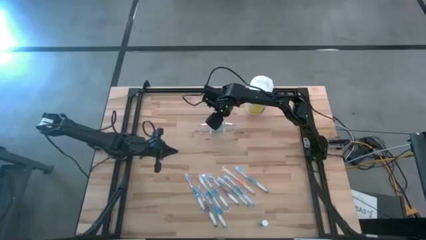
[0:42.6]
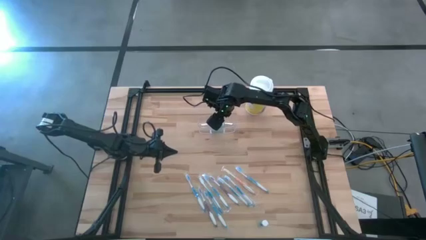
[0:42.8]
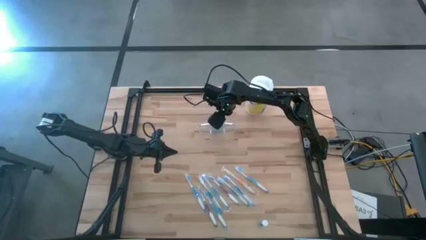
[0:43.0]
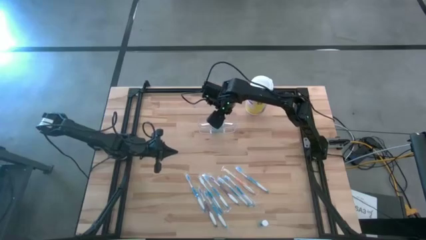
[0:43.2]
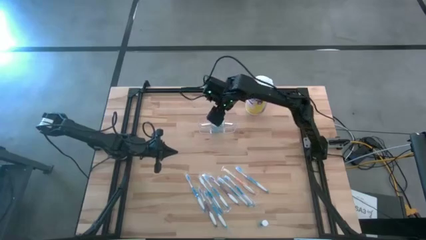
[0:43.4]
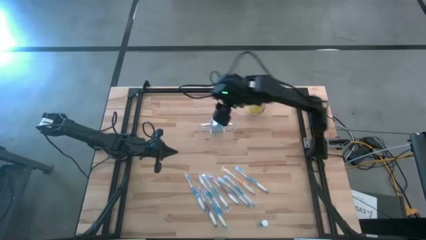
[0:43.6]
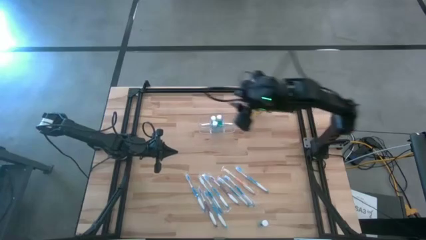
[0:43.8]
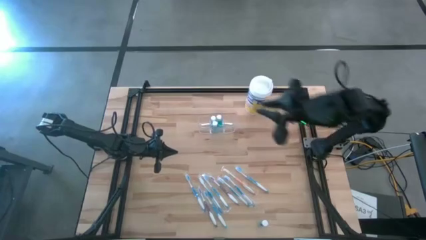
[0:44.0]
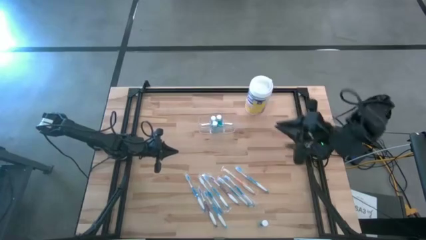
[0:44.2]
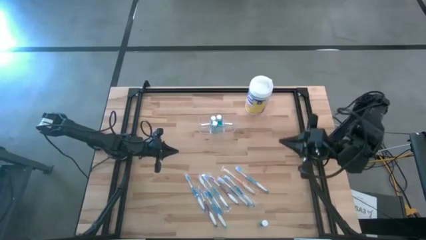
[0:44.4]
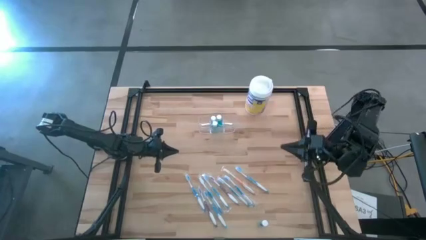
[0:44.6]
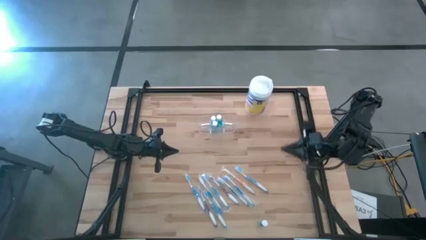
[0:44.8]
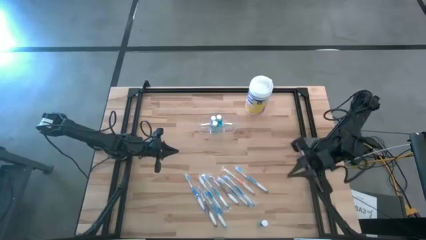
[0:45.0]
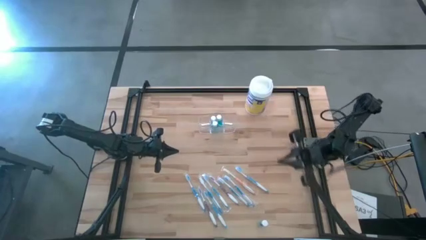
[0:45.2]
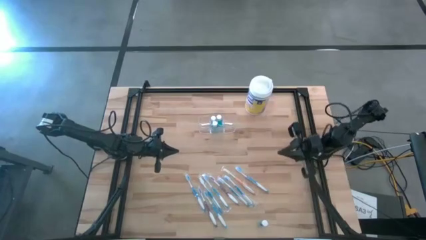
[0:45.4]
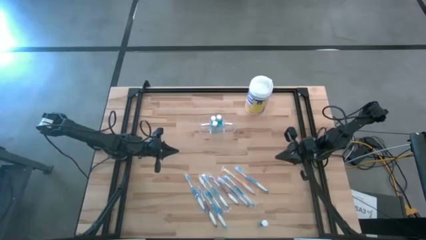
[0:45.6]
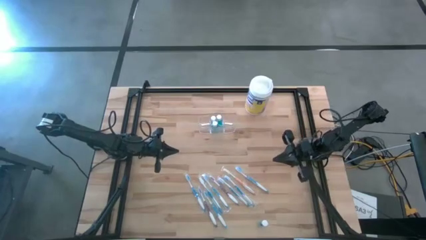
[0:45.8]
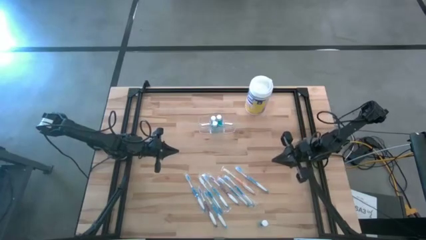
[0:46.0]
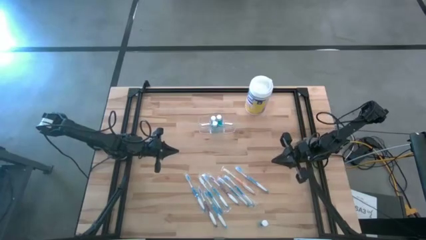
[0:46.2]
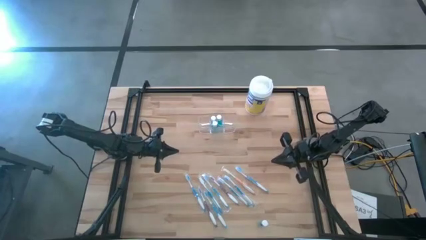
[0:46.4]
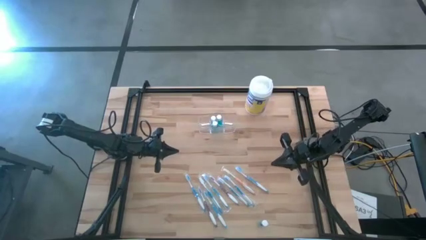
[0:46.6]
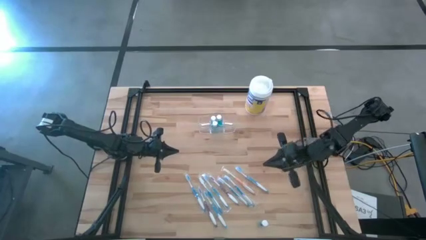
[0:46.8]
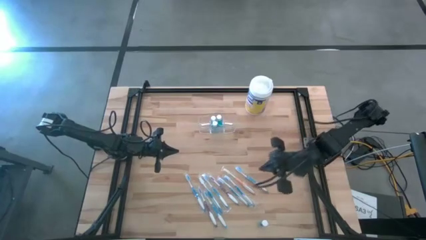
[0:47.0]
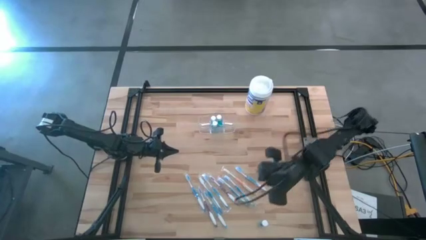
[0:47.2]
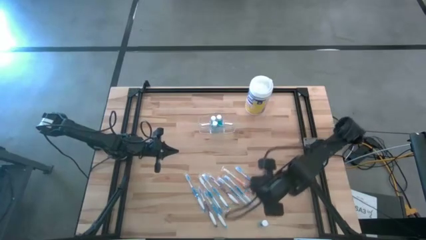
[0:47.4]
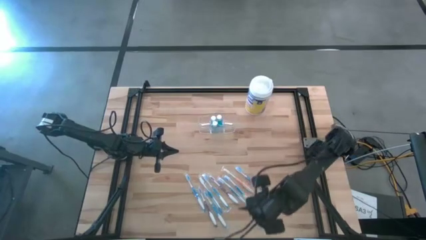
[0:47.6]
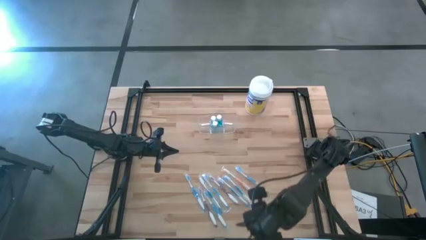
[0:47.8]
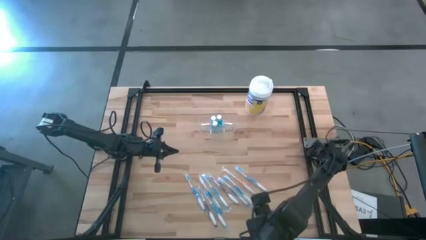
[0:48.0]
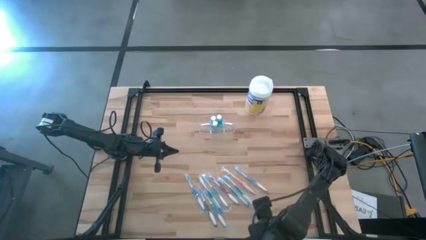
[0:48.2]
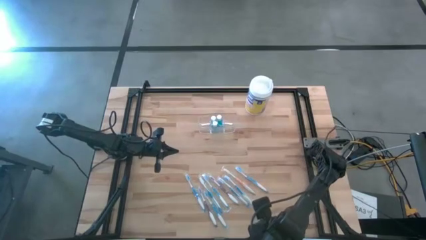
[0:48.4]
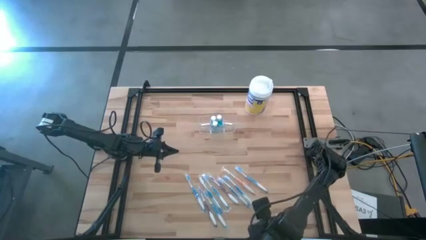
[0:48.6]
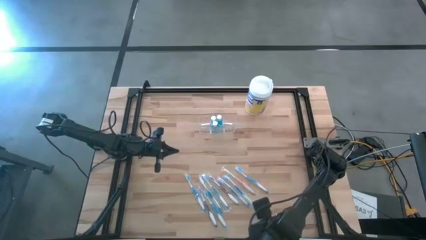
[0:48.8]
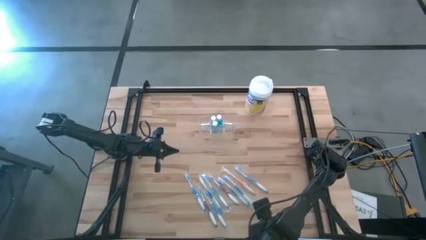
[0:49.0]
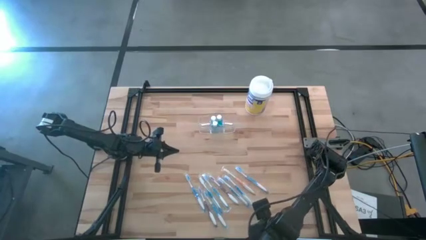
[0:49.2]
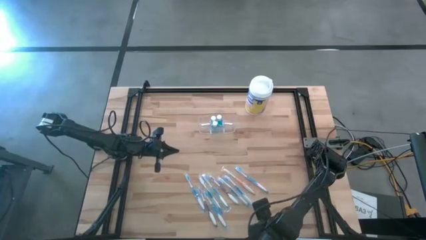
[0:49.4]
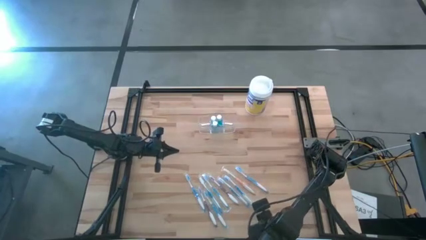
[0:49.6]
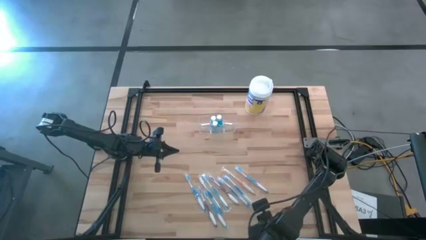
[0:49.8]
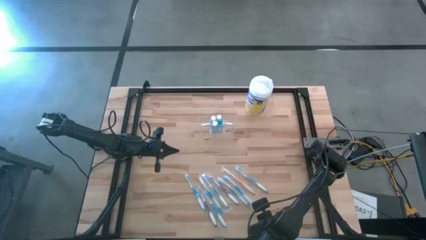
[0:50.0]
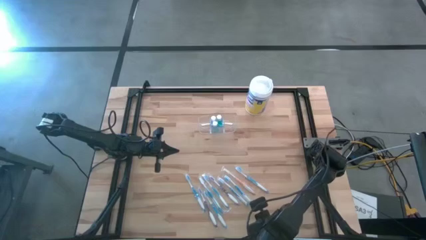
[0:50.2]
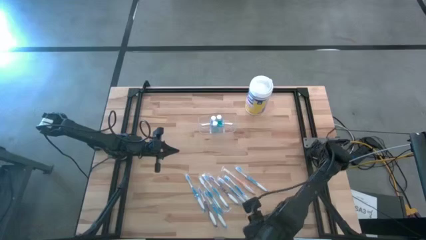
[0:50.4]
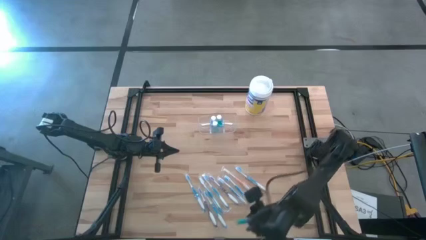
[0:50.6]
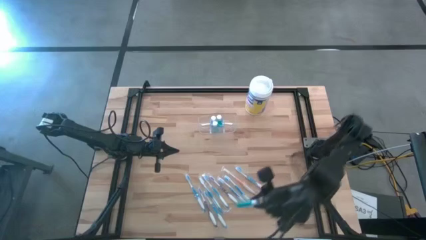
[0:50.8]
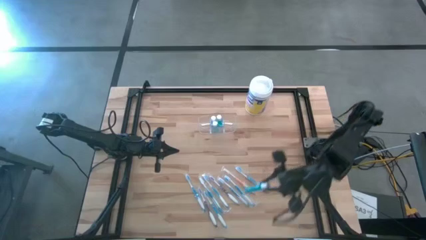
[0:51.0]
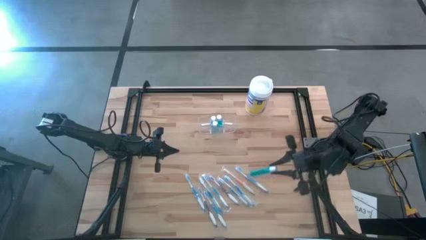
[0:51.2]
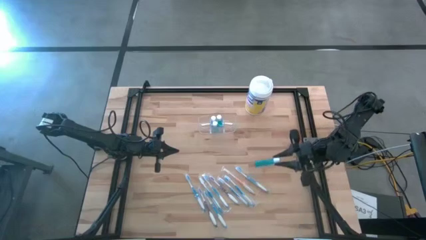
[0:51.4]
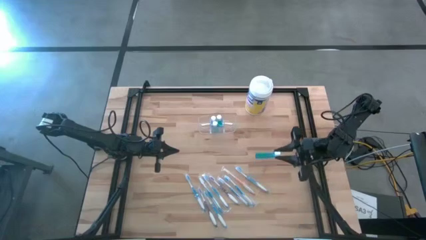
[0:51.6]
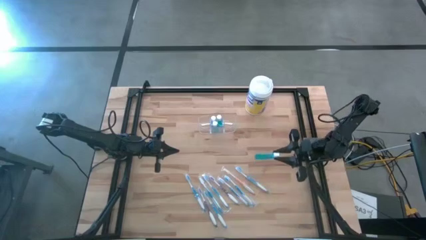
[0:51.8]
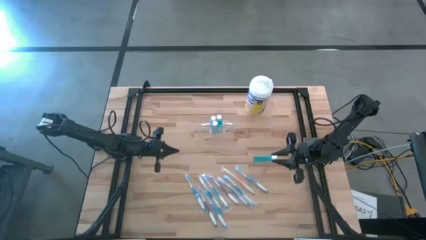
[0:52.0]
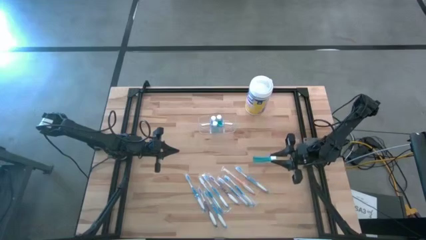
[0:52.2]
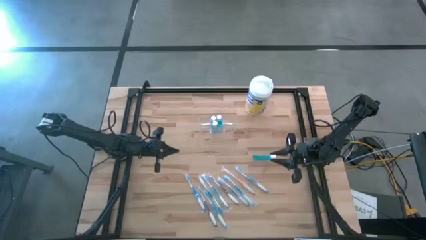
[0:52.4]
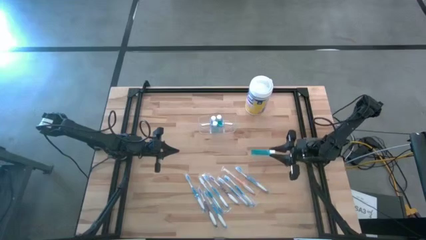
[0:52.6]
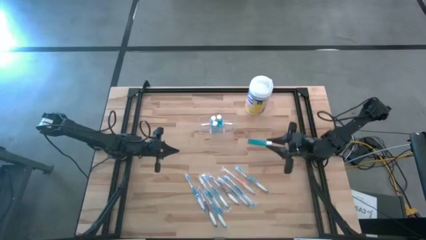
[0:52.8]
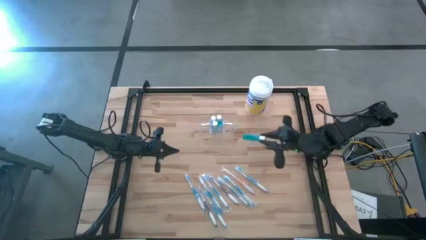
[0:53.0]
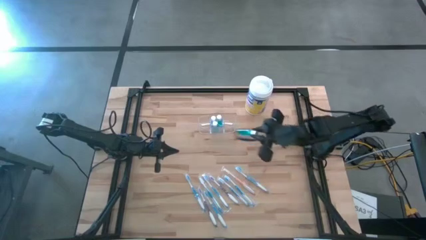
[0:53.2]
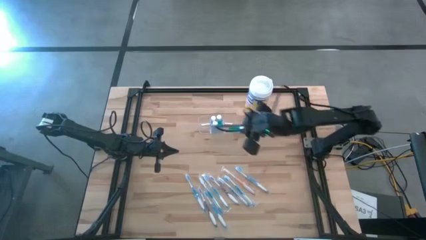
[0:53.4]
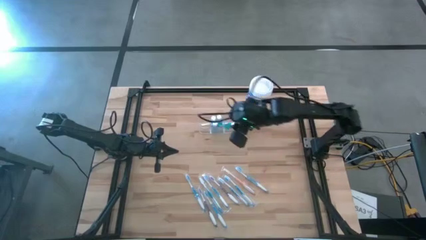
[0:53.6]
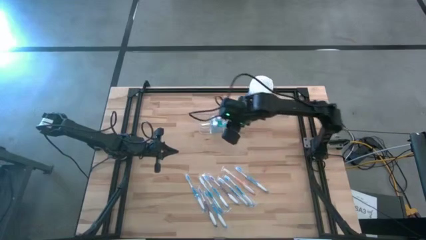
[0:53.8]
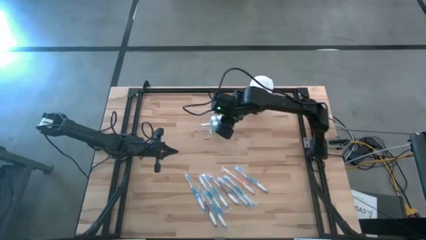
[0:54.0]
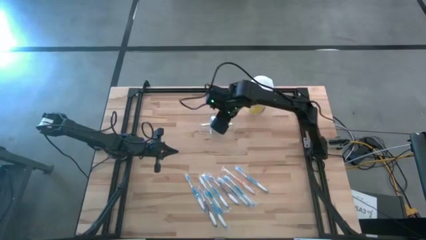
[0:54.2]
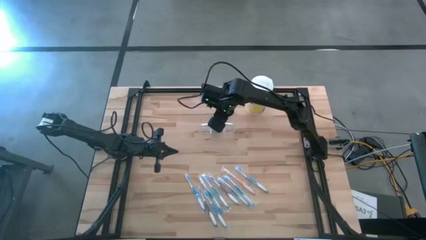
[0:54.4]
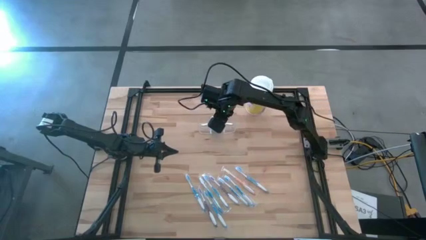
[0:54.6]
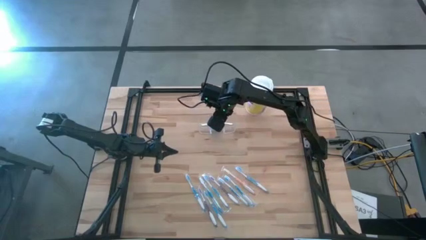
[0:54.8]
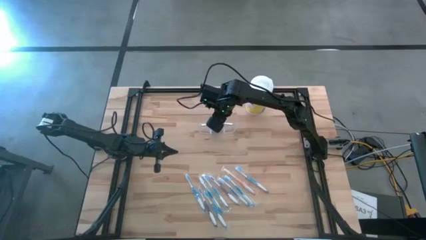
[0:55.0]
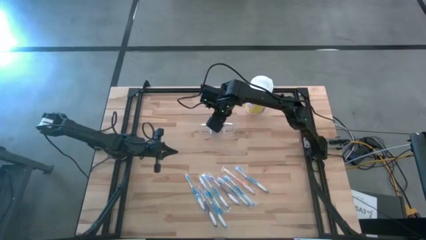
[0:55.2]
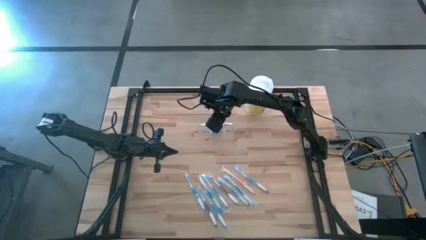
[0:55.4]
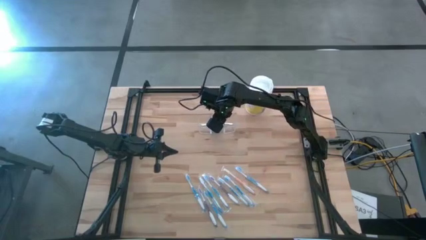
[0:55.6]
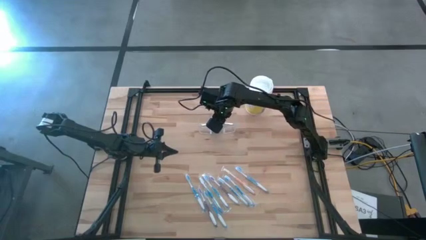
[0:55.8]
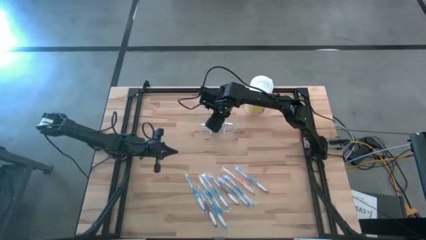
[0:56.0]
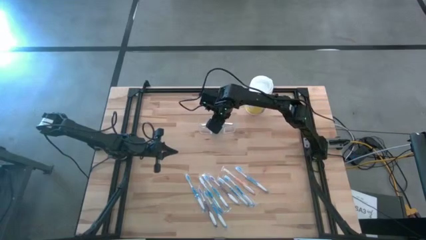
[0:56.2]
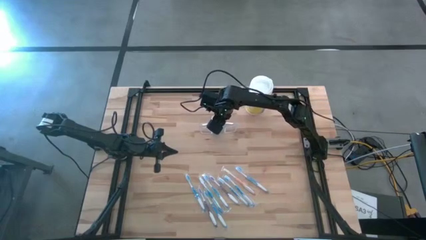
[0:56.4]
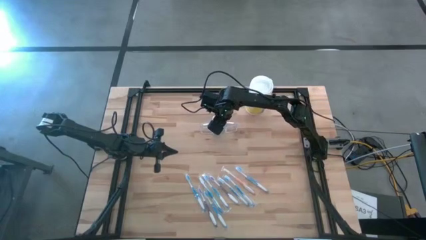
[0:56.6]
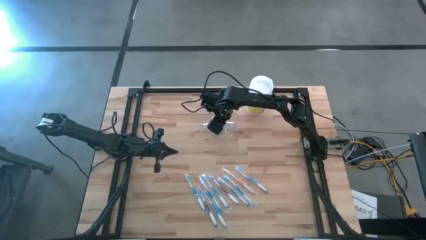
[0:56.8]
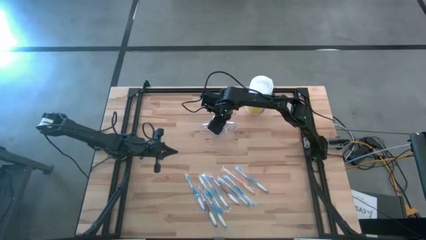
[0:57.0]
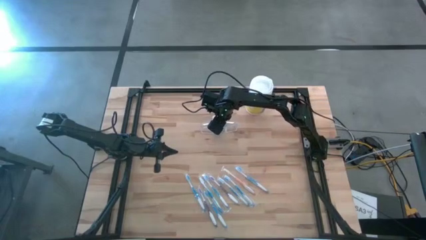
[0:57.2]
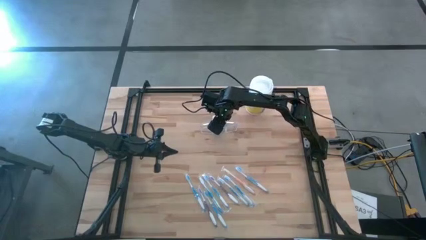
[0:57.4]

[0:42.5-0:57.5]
Task: Pick & Place toothbrushing station
Put the blue mouthwash into the transparent organizer
